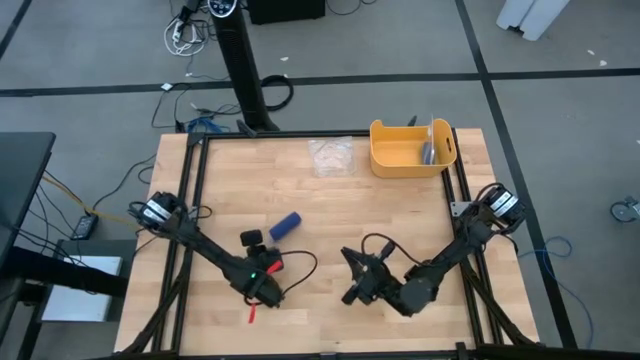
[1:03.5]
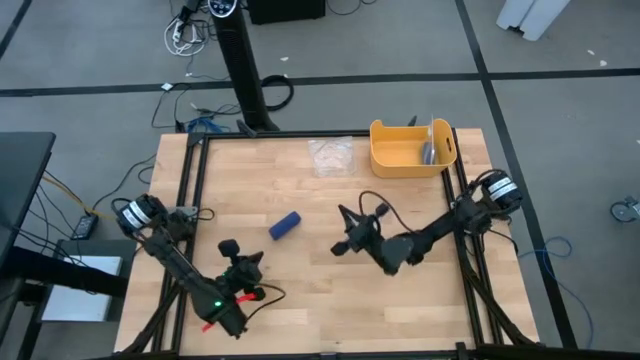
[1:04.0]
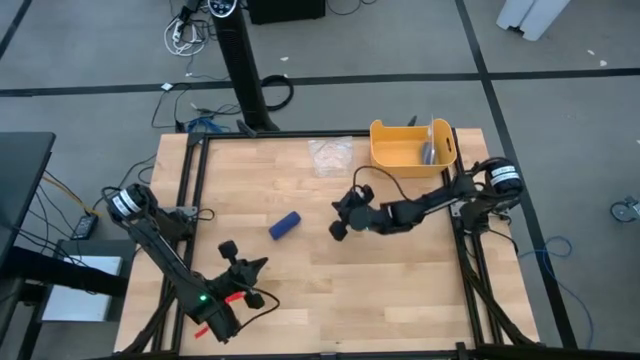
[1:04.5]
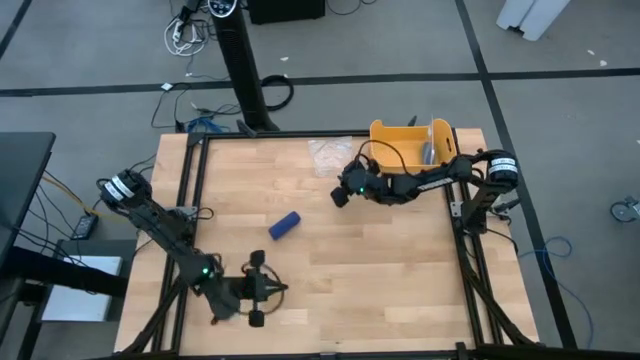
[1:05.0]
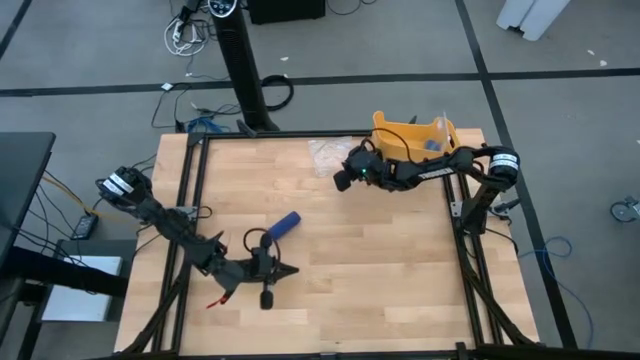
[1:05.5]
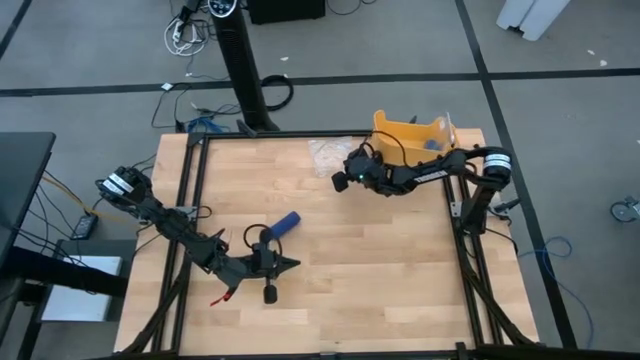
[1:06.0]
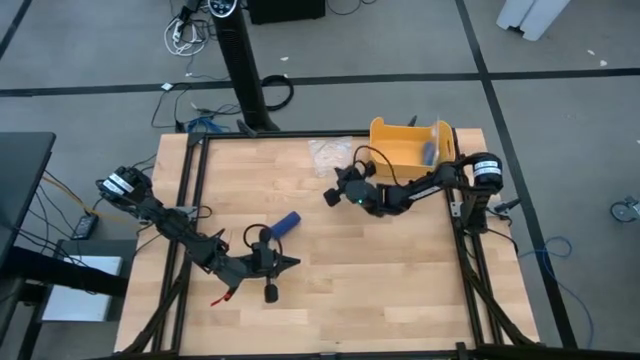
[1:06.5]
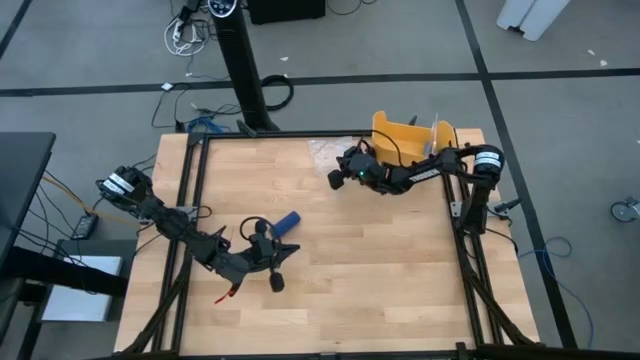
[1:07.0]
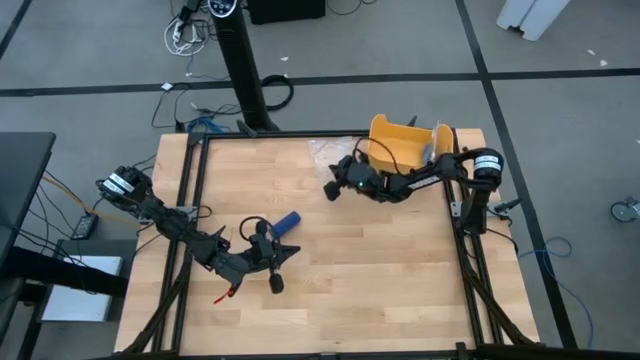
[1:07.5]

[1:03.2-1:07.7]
Task: Roll bandage
Prepare the transparent zip bag

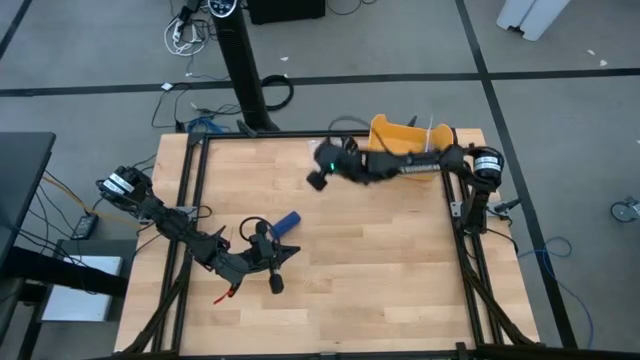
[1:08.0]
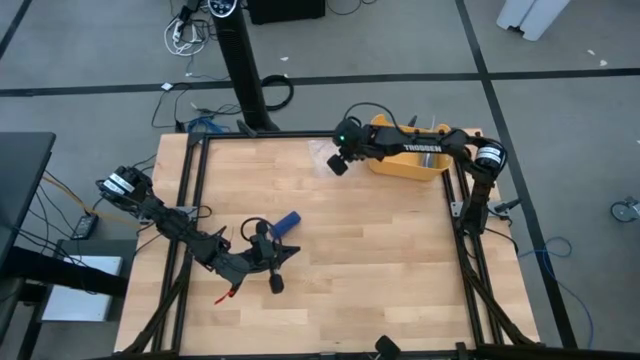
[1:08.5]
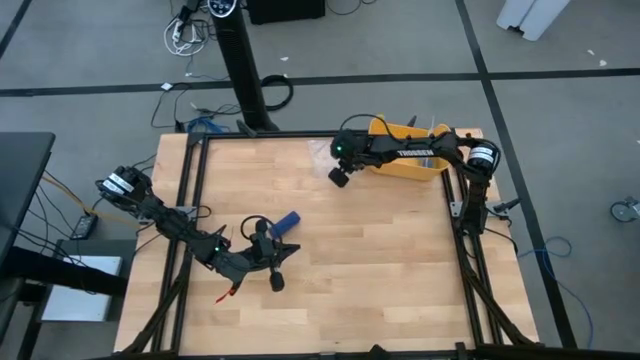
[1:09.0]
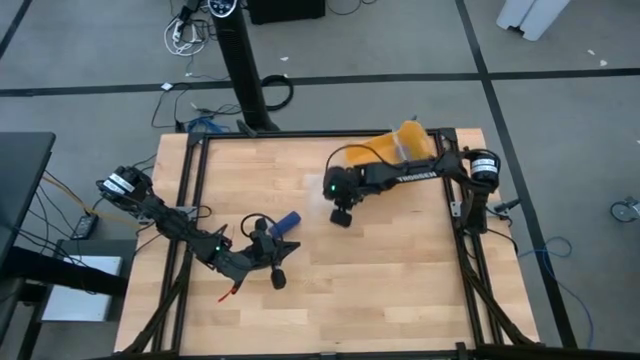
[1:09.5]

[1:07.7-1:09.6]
Prepare the transparent zip bag

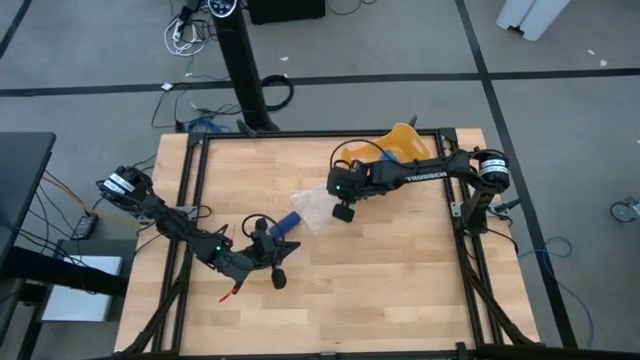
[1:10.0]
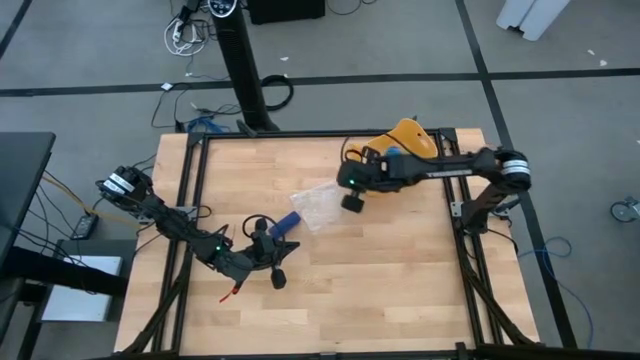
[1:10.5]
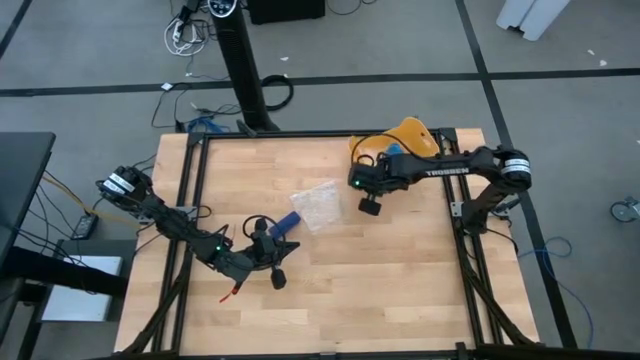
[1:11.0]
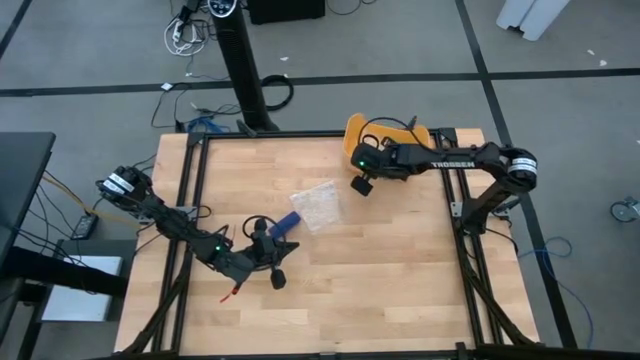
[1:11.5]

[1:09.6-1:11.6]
Adjust the yellow bin

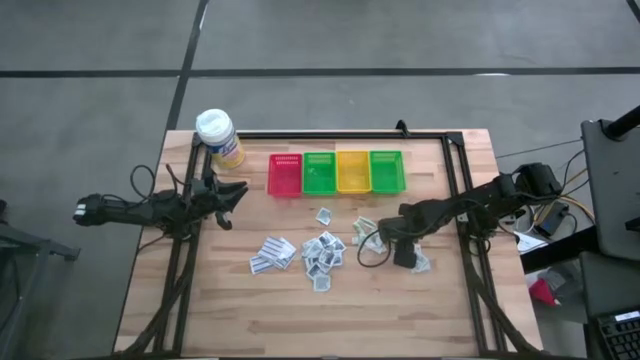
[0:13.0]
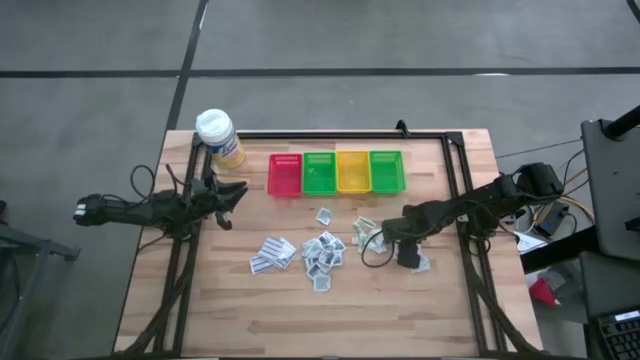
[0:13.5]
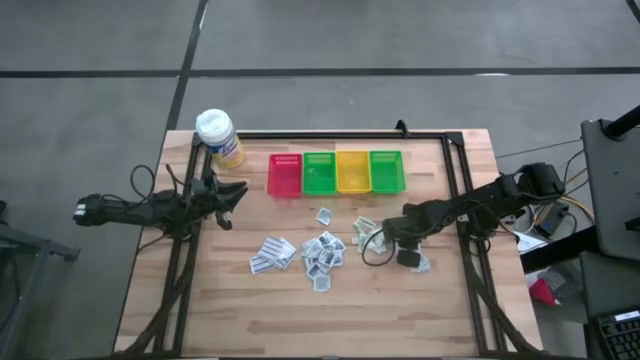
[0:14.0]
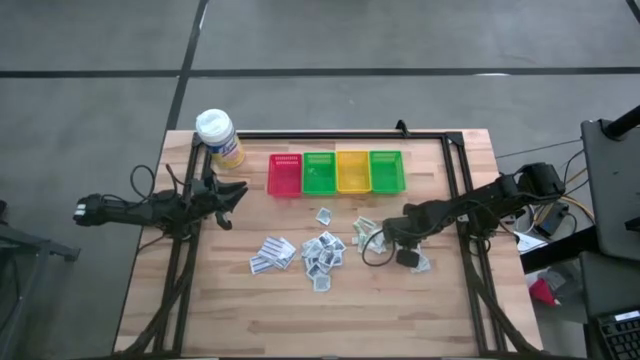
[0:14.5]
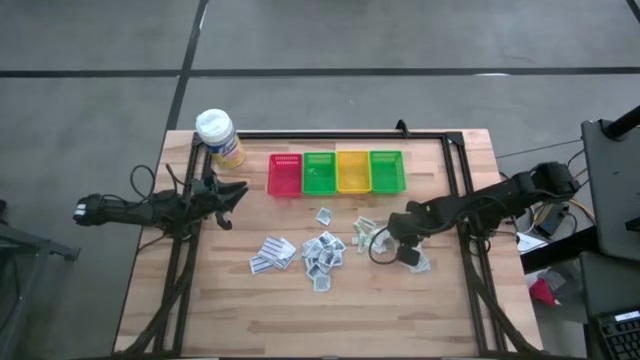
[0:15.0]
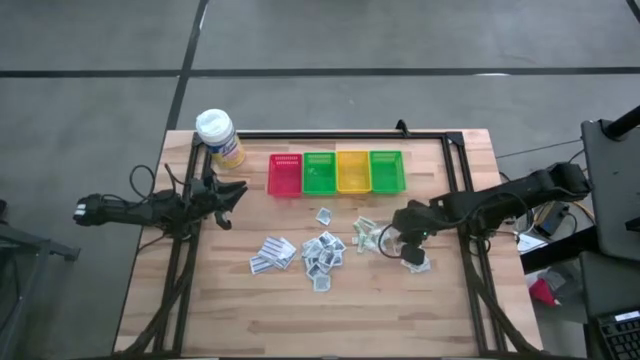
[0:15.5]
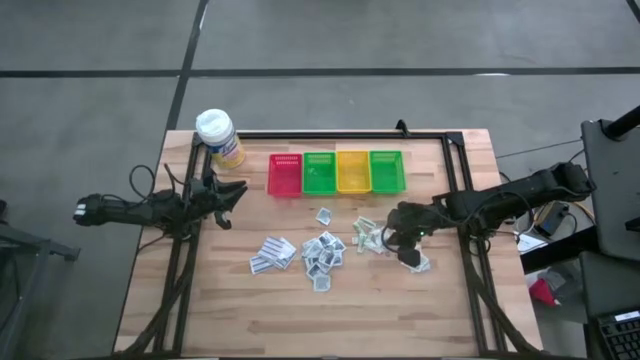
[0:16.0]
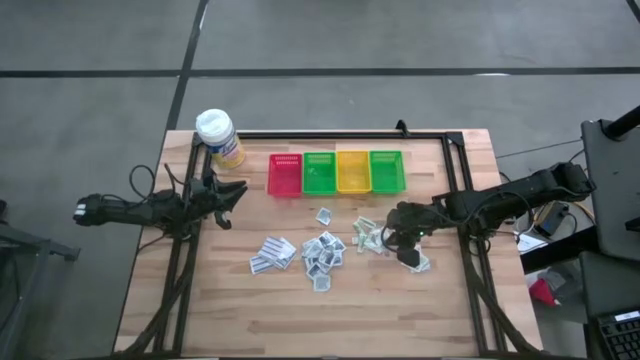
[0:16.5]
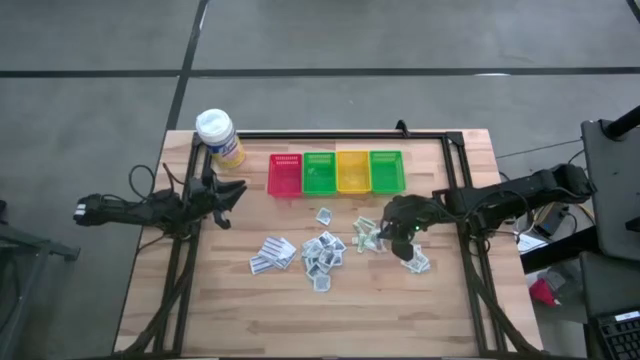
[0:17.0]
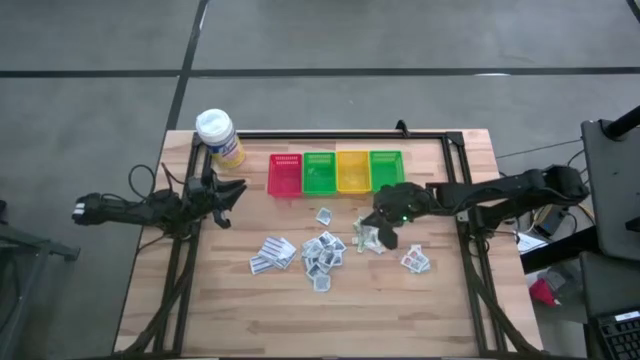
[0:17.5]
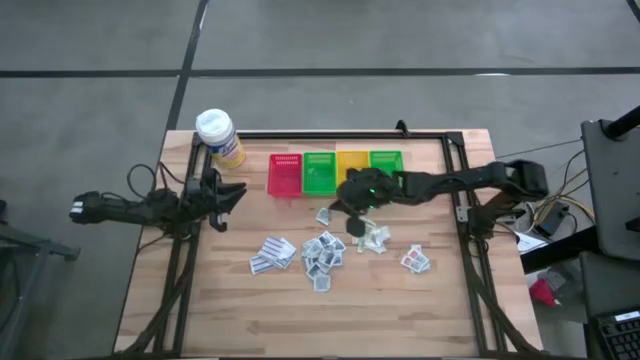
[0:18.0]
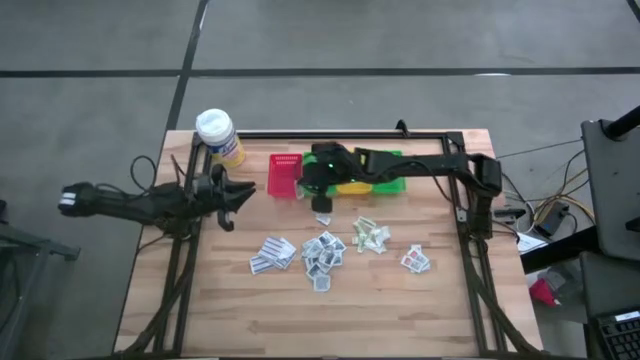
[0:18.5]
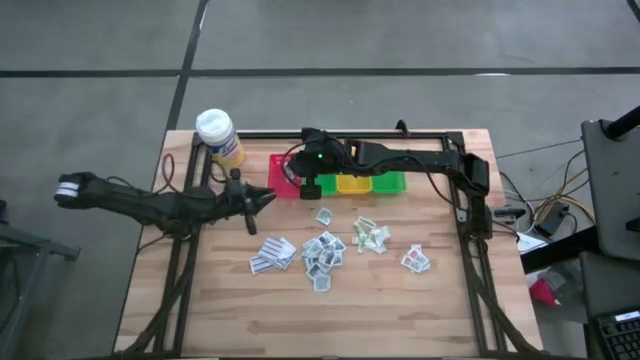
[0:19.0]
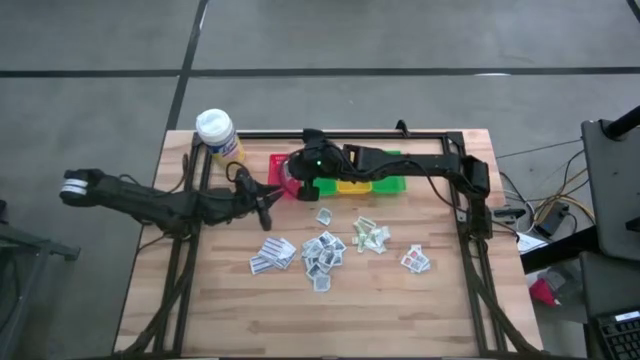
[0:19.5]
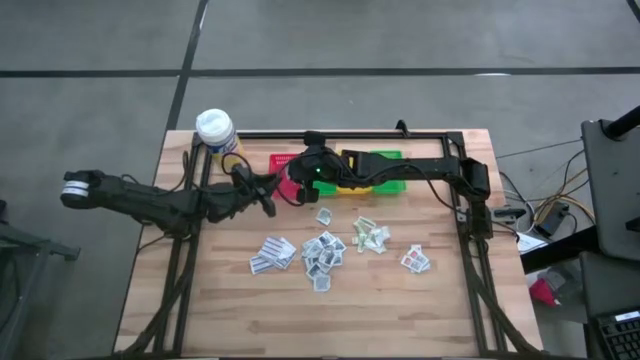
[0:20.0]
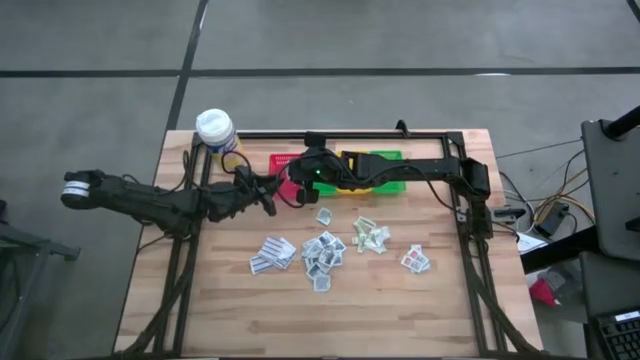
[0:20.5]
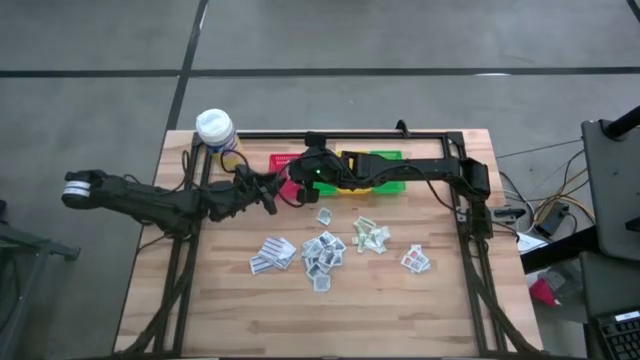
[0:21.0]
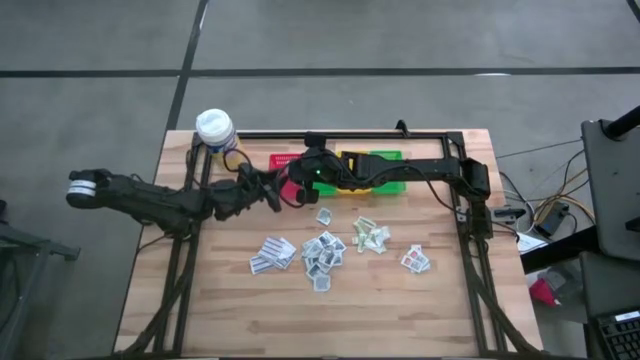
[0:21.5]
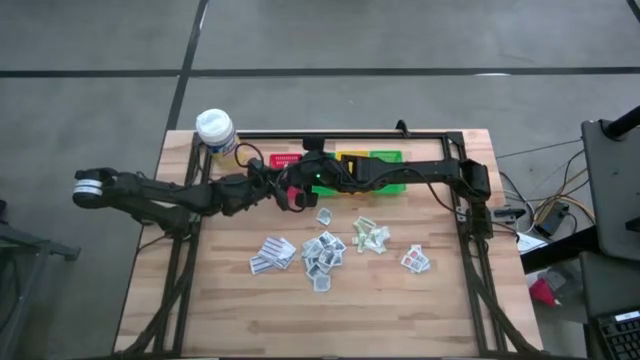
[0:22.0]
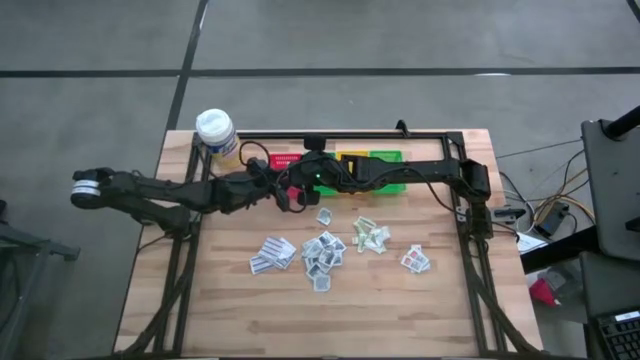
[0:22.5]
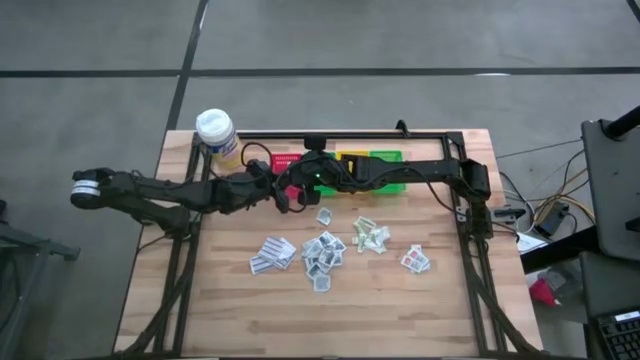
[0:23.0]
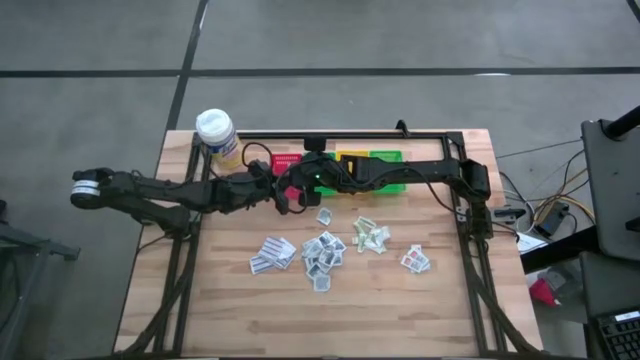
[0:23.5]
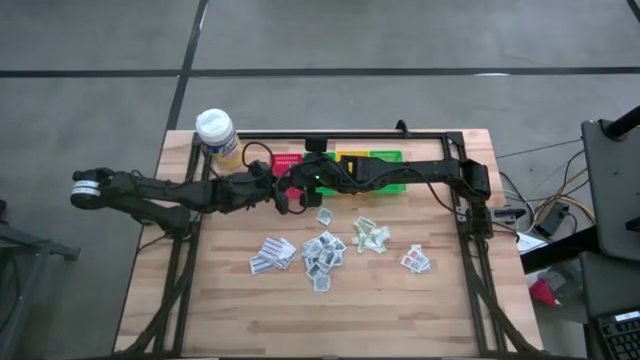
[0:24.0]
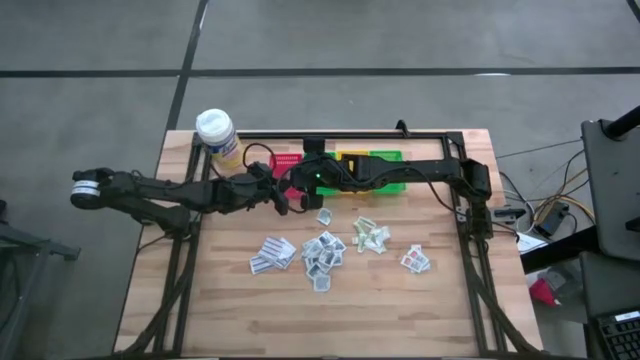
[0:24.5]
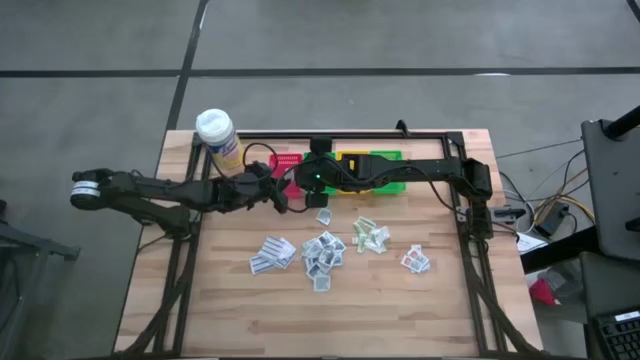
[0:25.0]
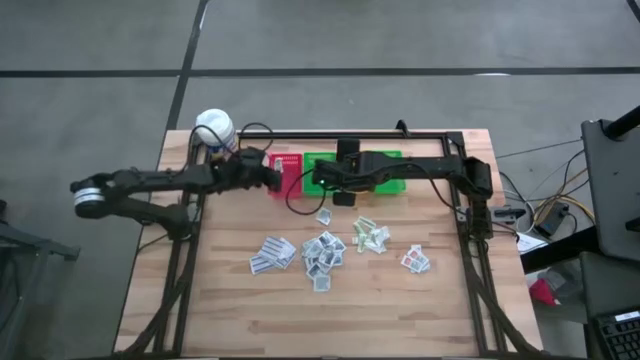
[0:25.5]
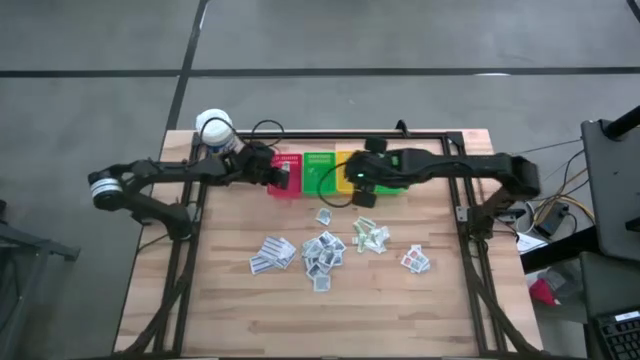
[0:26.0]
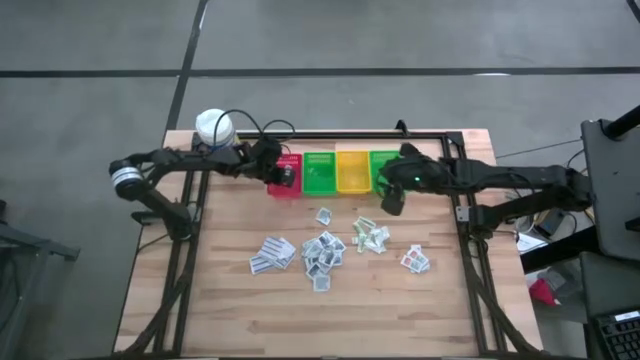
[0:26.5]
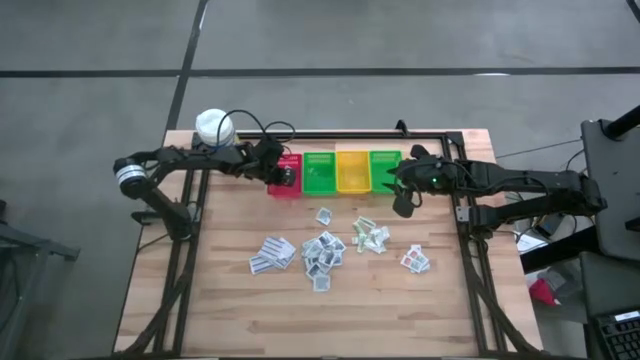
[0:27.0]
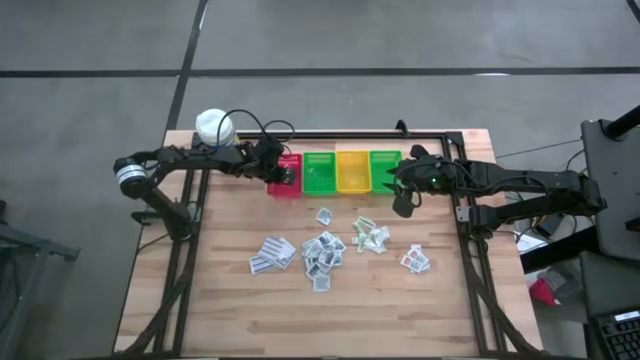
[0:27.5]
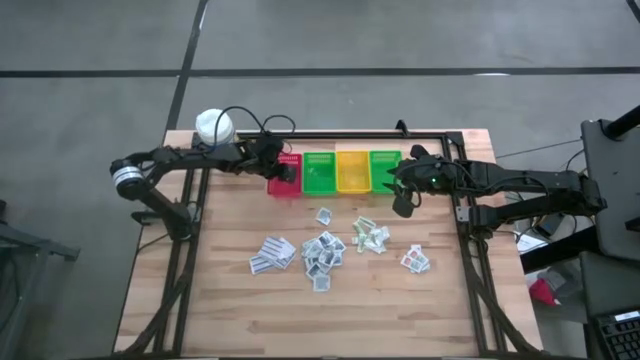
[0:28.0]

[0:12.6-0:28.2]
Task: Pick & Place First Aid Supplies
Put the ointment pack into the red bin
